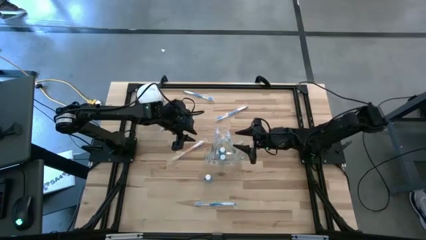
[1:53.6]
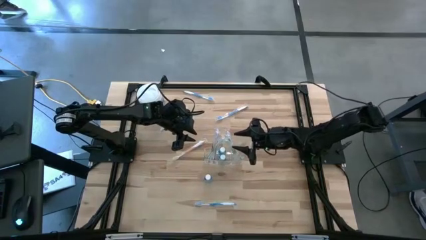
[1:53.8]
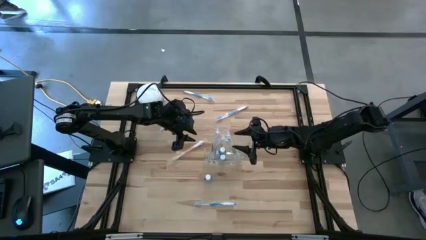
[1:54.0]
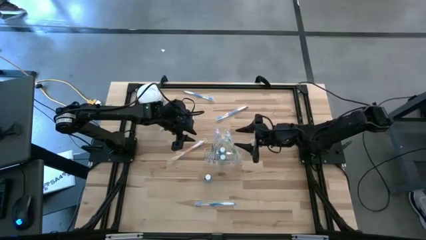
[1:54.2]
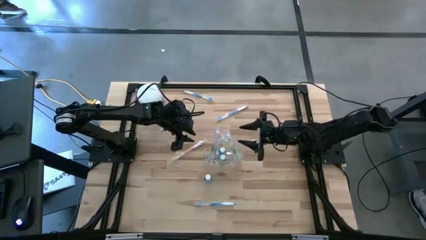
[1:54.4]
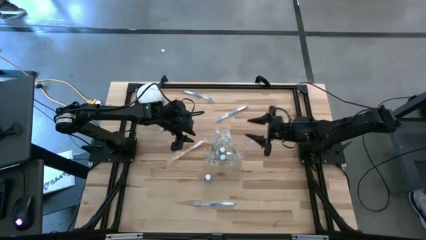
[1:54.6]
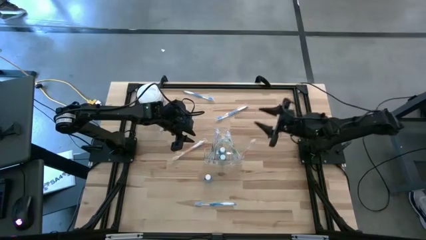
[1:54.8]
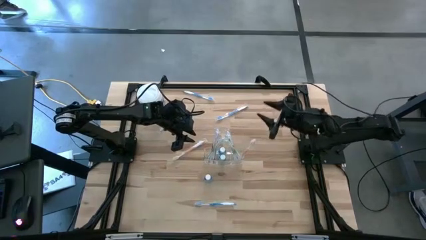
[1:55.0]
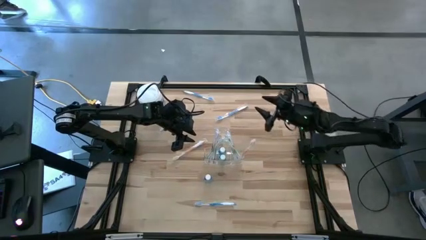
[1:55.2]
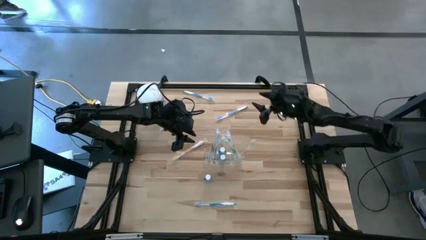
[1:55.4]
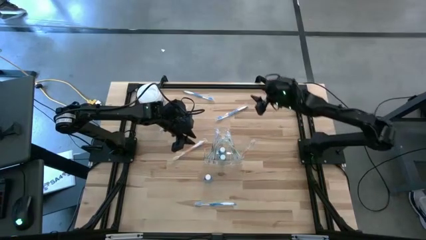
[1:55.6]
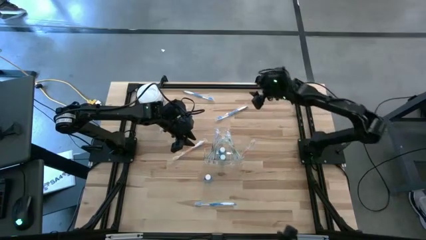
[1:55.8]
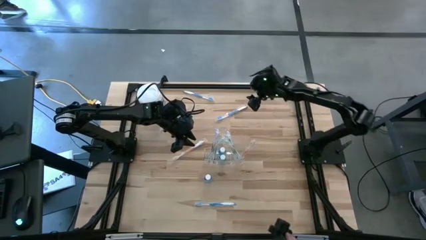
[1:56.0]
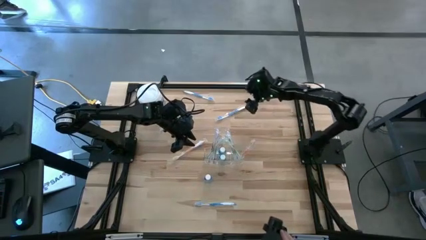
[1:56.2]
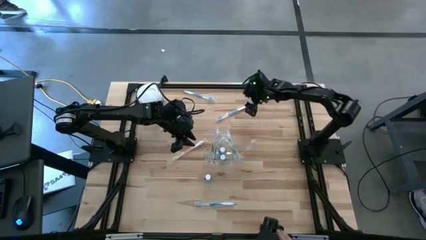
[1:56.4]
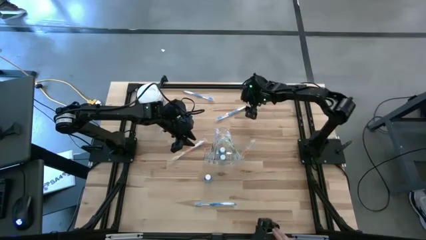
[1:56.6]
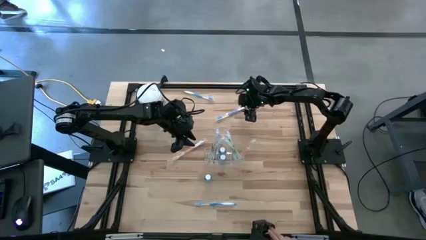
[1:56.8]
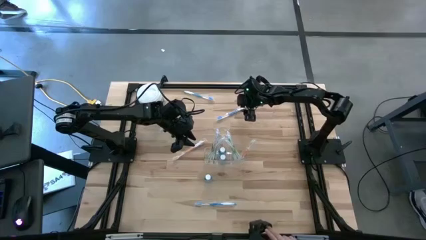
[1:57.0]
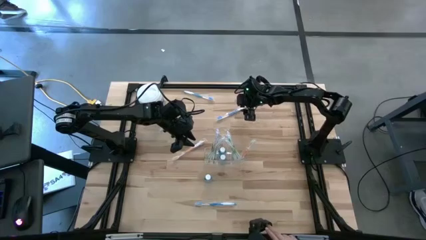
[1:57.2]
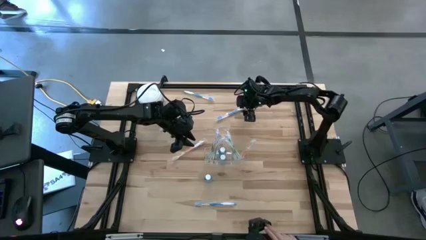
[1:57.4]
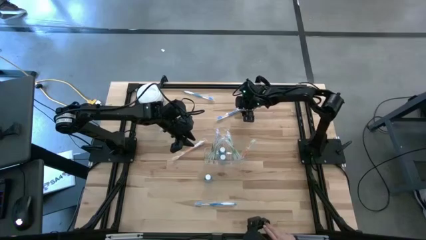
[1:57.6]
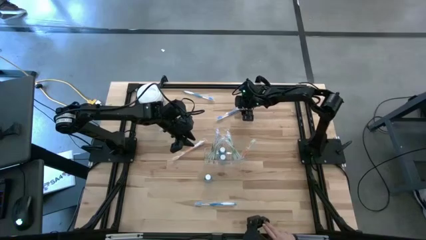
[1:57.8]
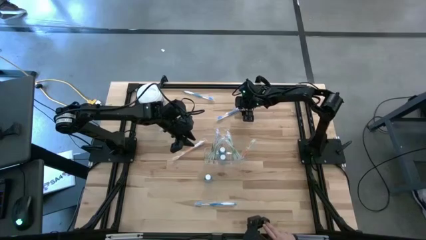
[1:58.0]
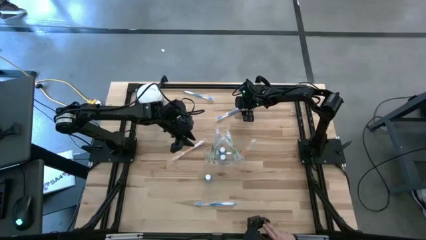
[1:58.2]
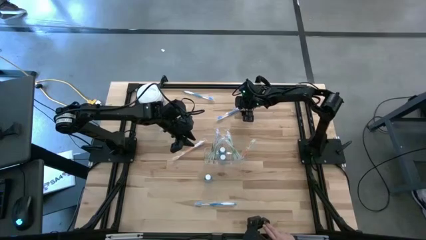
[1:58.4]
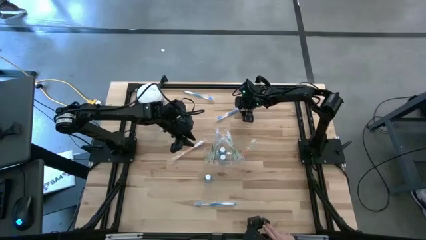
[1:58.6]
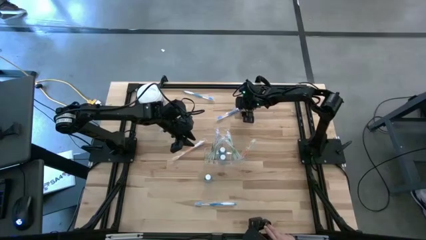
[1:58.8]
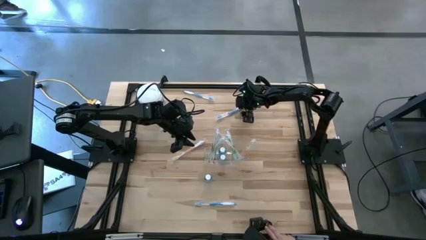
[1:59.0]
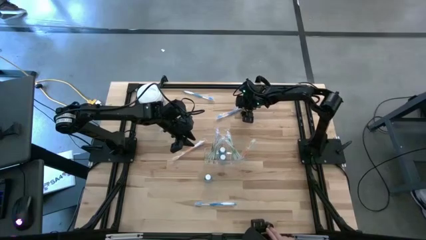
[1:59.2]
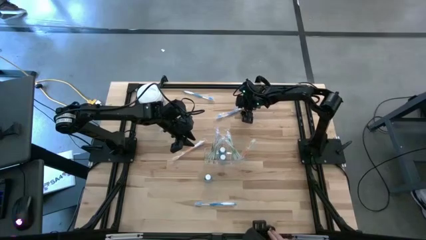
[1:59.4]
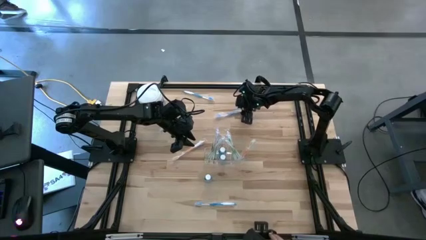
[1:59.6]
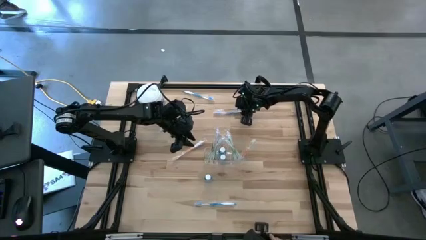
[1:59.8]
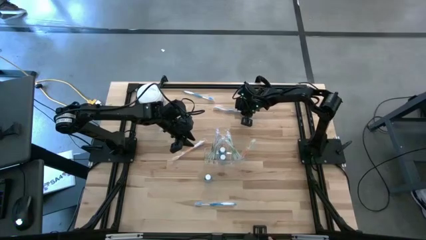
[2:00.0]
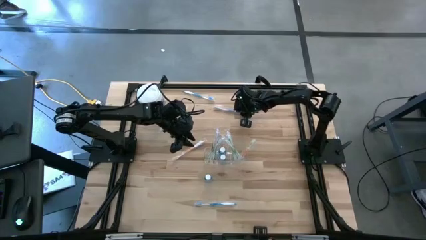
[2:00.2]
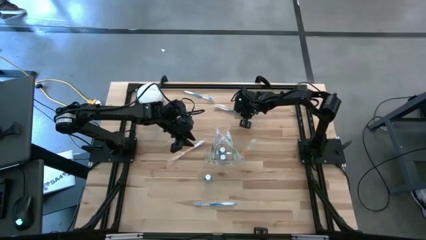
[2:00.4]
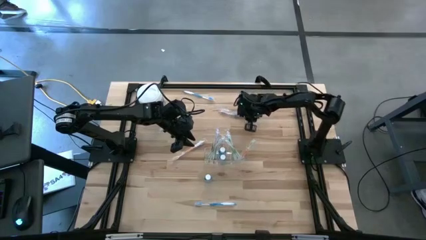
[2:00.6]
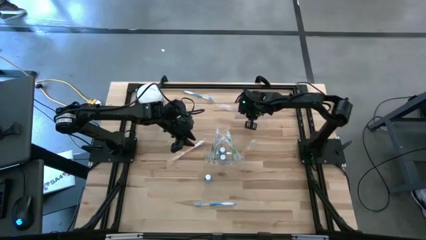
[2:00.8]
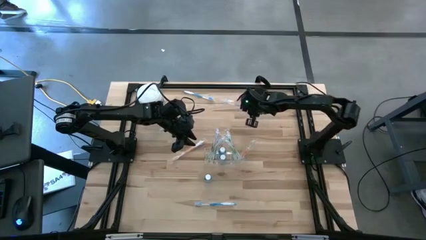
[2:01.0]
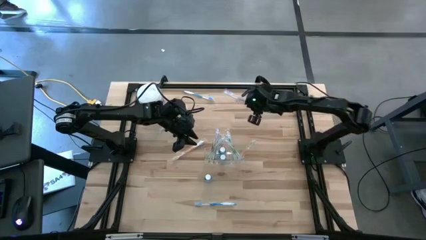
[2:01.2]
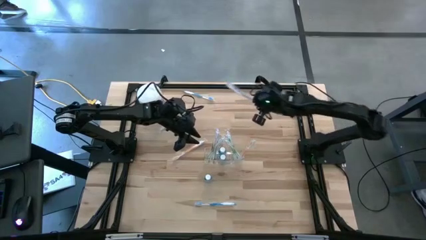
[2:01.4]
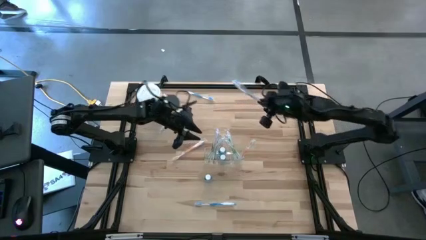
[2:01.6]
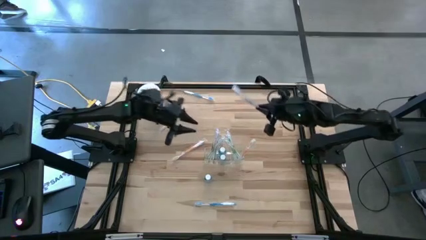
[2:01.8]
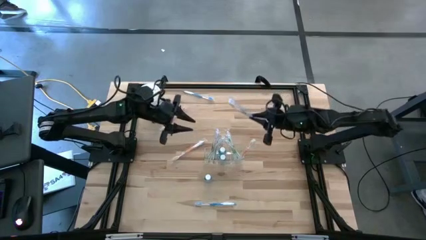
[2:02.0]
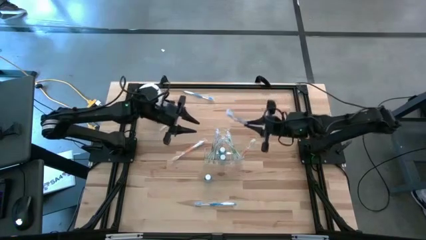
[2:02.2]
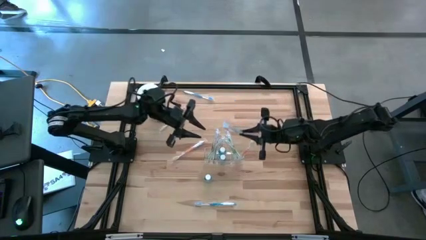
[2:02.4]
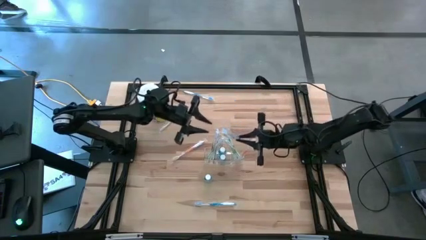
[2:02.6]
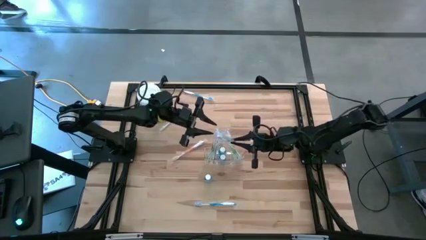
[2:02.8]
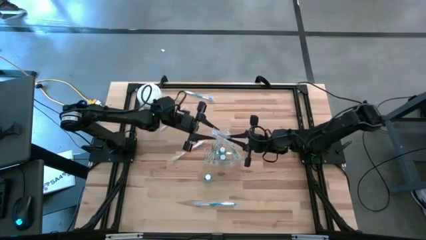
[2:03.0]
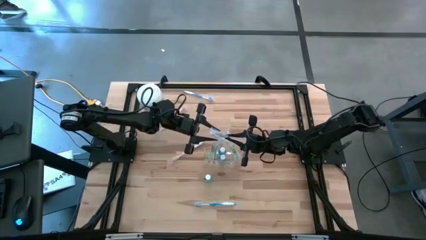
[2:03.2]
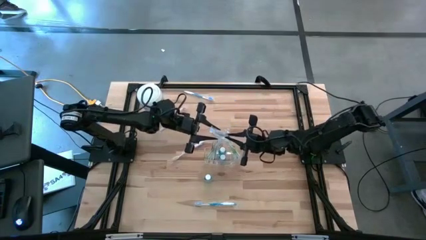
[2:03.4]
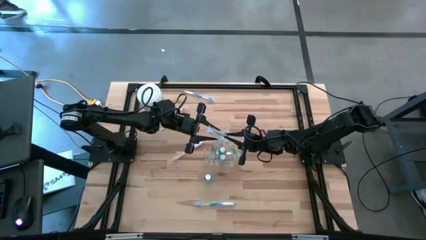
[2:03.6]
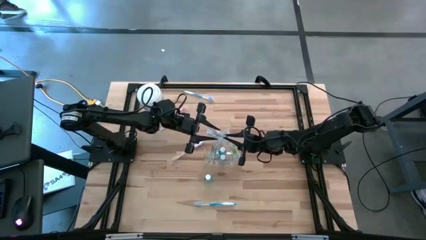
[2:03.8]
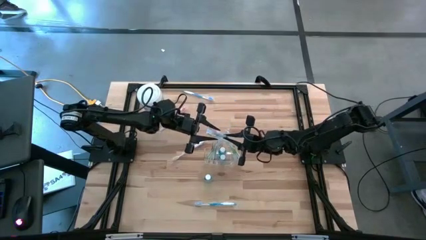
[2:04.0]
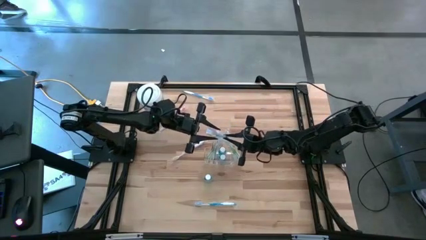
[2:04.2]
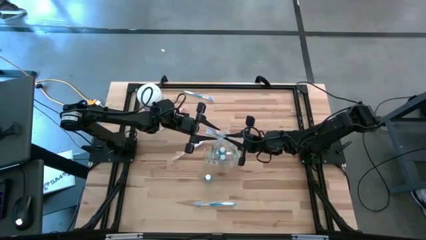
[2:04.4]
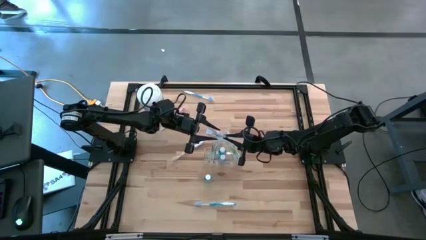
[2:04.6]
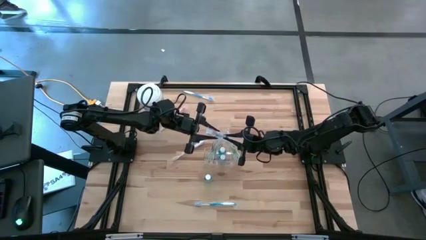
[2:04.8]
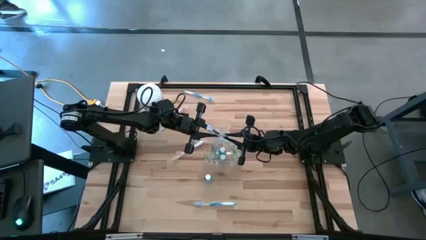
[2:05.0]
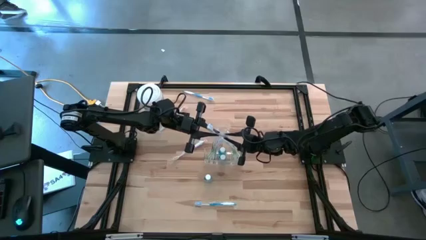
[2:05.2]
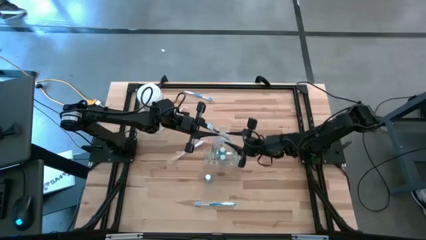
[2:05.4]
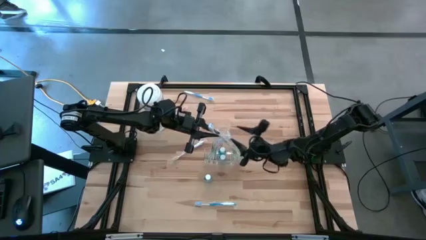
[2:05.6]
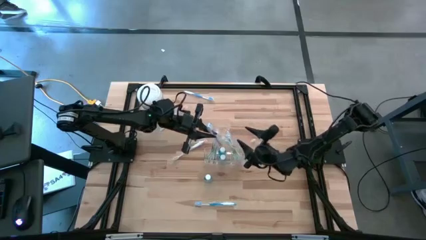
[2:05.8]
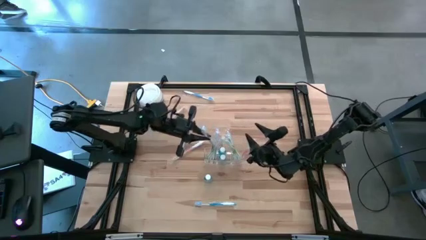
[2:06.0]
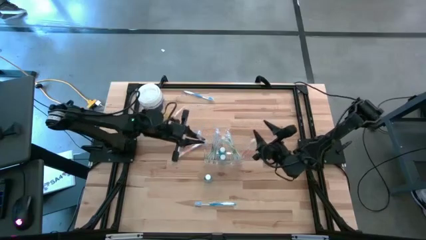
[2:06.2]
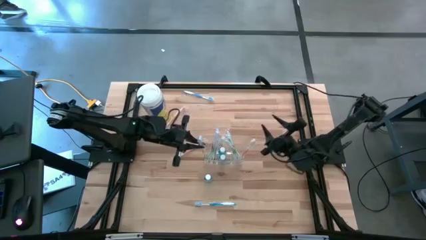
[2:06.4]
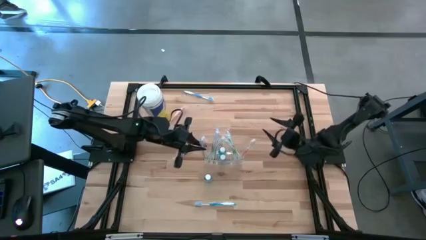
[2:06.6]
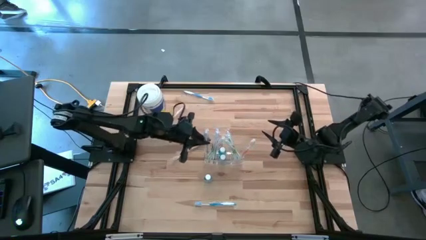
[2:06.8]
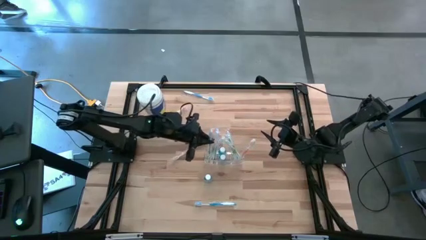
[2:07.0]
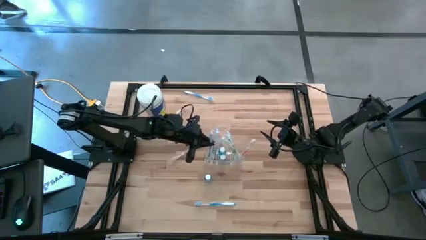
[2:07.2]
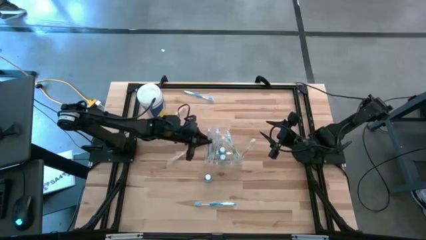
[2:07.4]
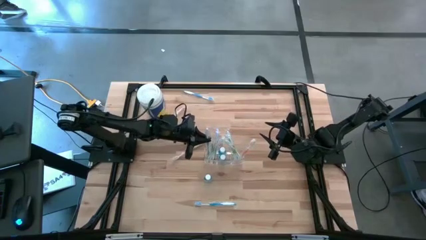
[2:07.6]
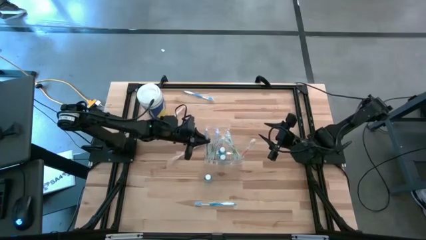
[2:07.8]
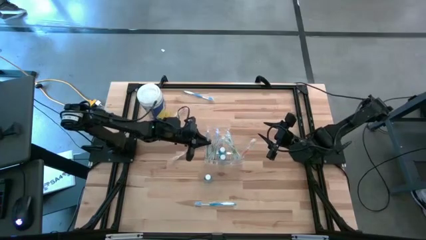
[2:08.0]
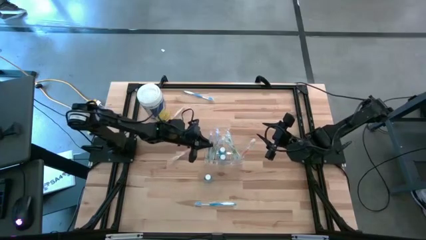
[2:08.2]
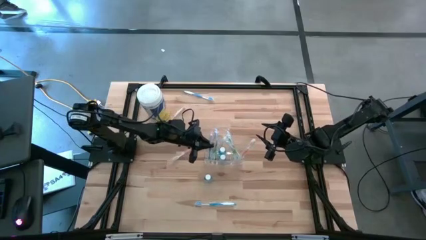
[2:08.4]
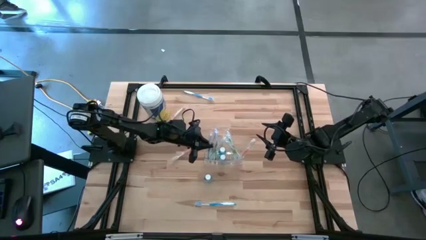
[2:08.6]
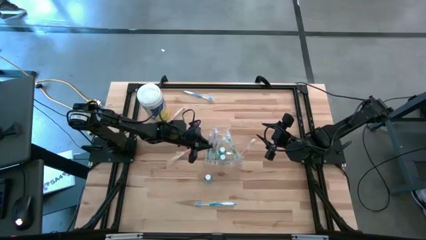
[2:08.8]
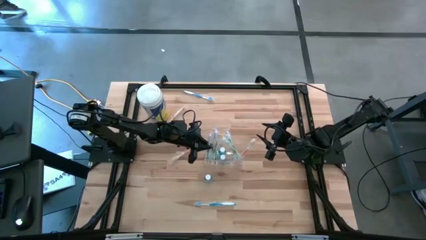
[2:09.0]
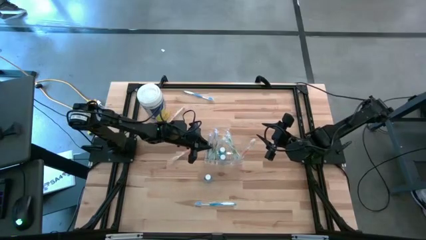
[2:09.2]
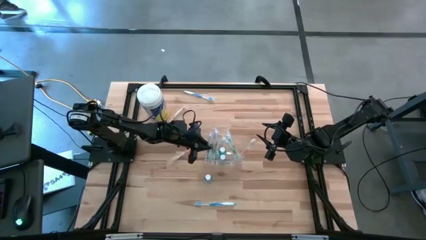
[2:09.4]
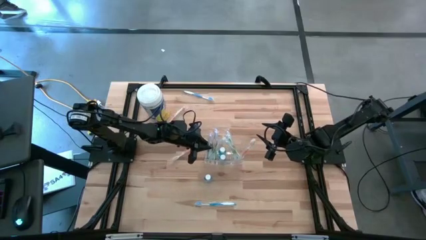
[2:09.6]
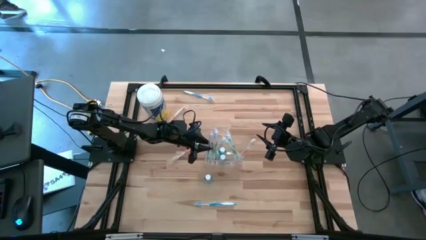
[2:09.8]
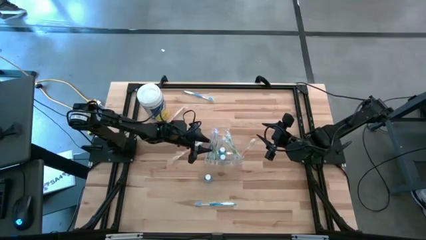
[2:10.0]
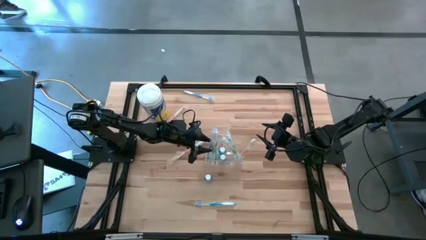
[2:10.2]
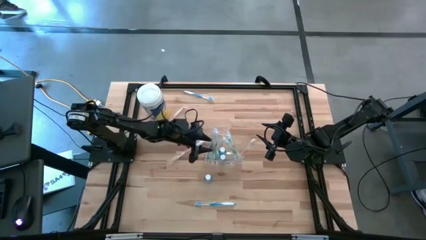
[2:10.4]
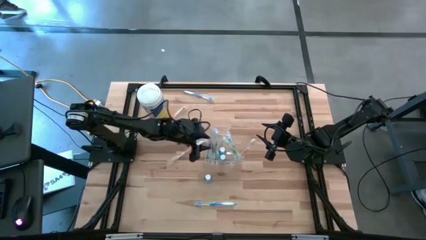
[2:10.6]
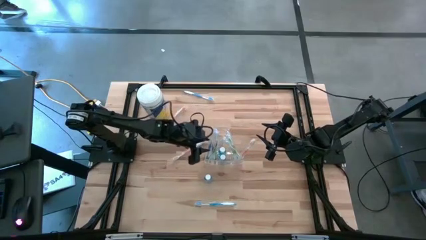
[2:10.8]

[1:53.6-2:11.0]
Task: Pick & Place toothbrushing station
Put the middle blue toothbrush into the transparent organizer
